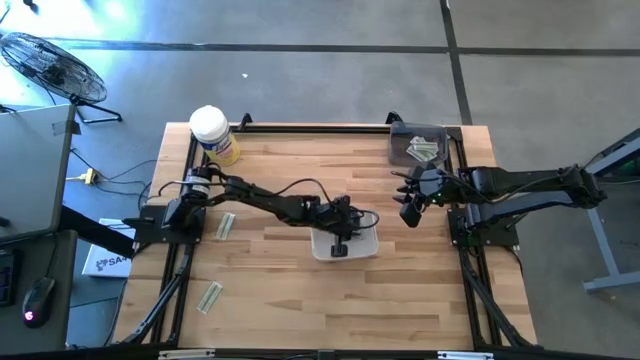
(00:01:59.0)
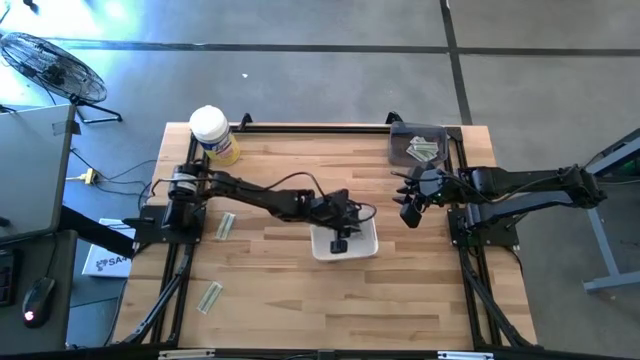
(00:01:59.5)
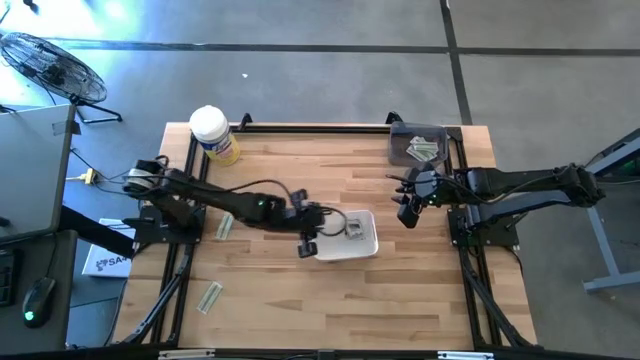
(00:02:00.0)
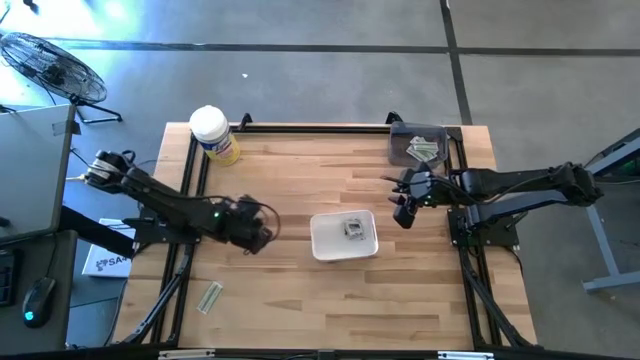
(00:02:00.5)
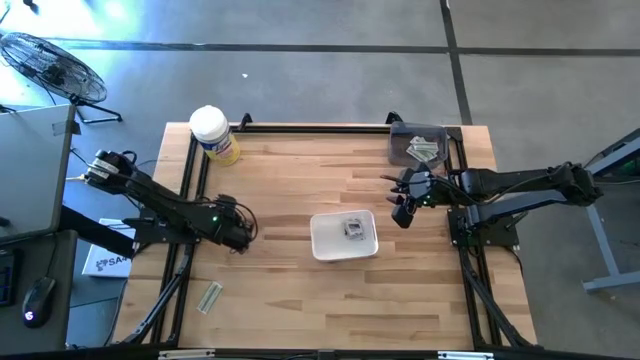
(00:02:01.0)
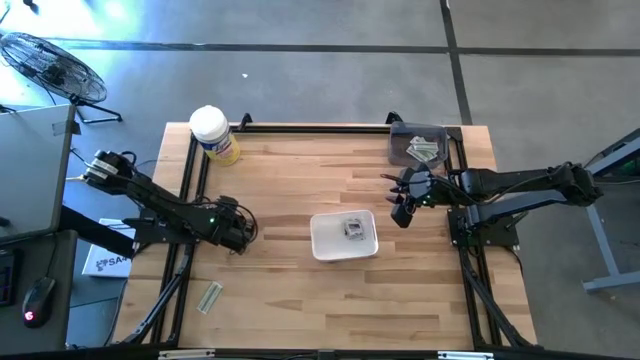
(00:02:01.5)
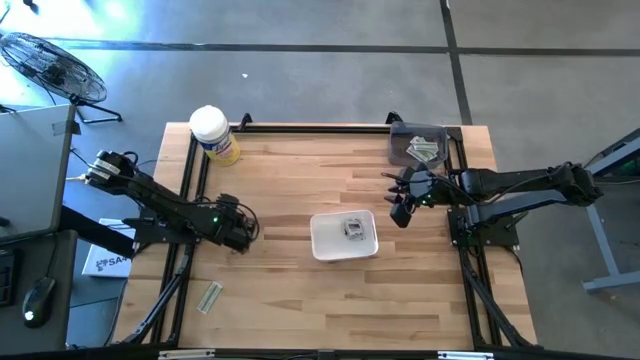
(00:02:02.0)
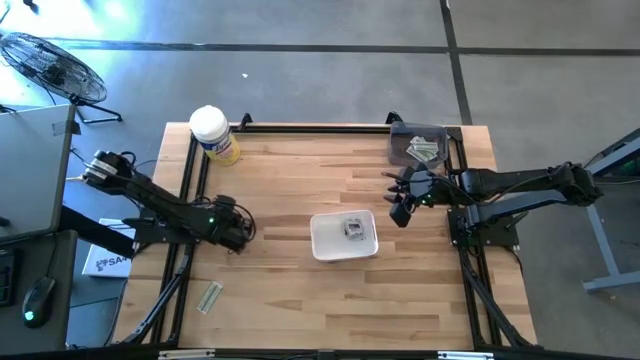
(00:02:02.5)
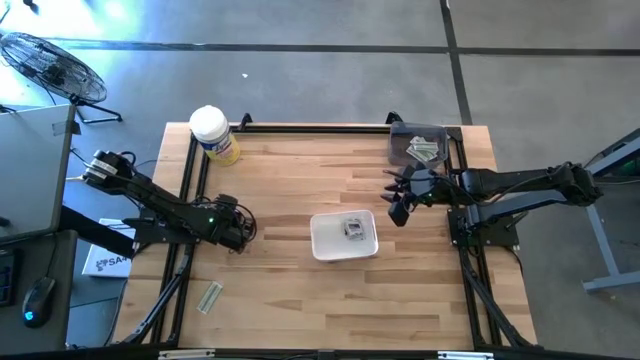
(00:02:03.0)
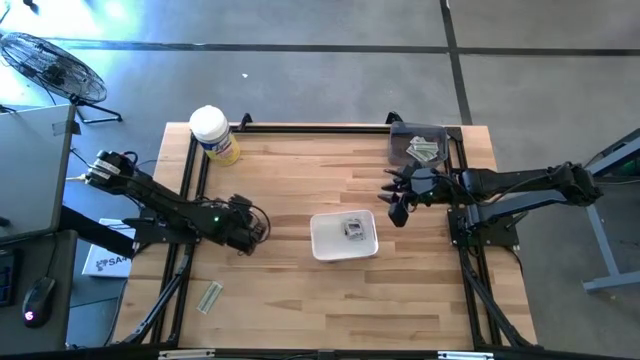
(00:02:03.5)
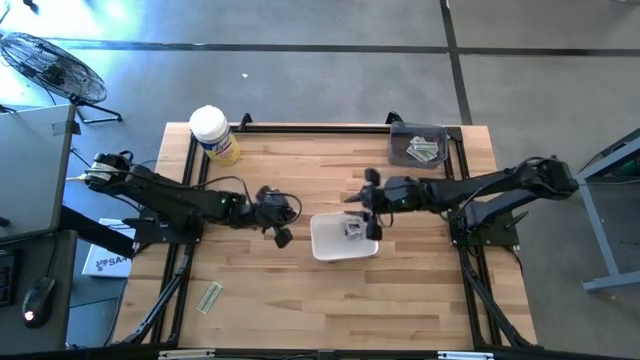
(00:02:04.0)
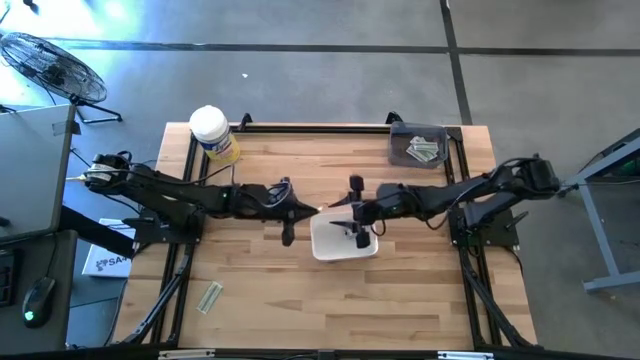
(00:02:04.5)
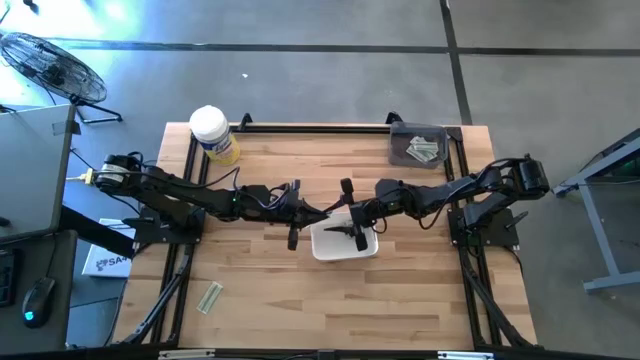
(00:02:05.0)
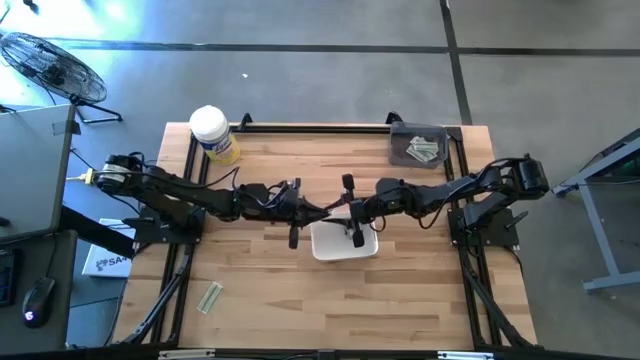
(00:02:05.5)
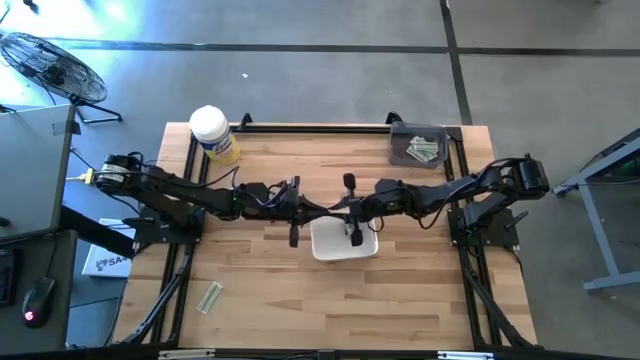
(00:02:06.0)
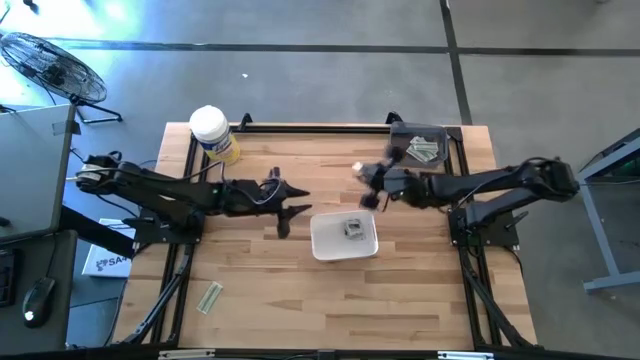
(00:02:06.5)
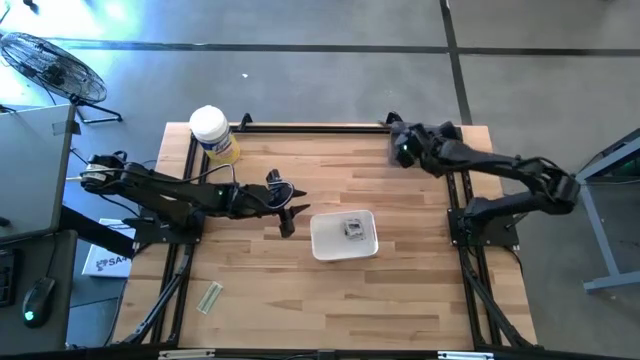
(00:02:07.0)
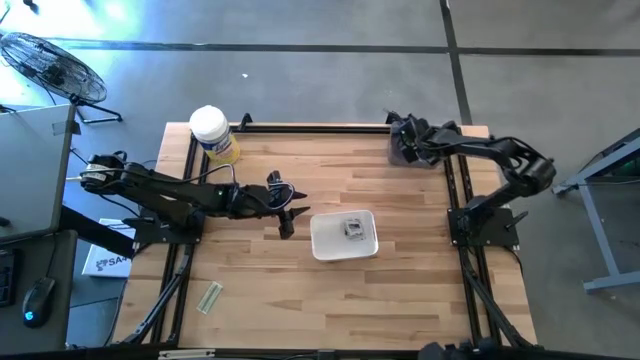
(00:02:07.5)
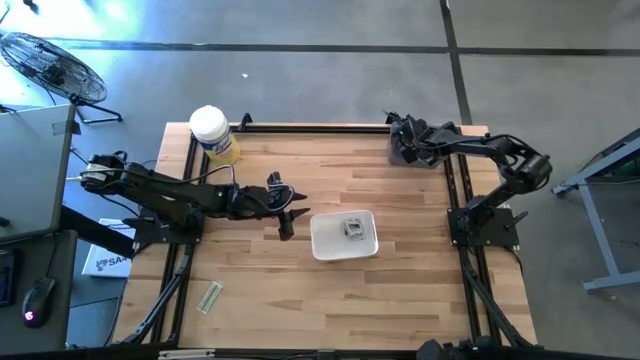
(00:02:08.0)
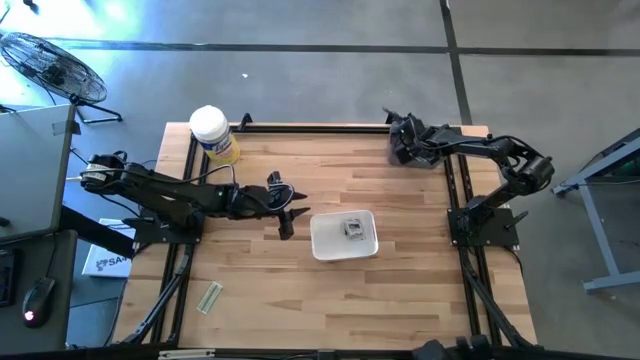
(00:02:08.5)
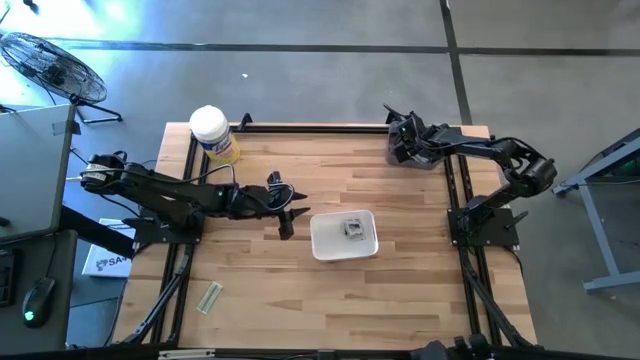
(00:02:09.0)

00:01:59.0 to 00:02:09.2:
Task: Pick & Place First Aid Supplies
Put the green bandage into the black bin

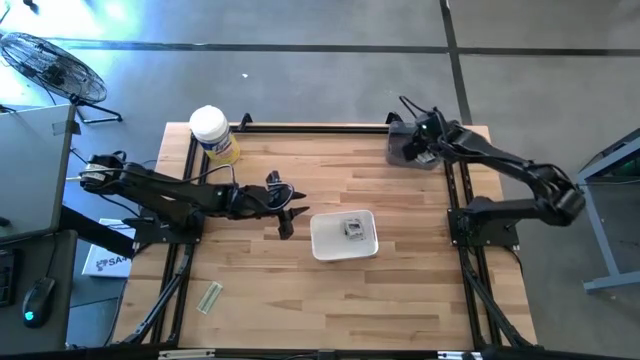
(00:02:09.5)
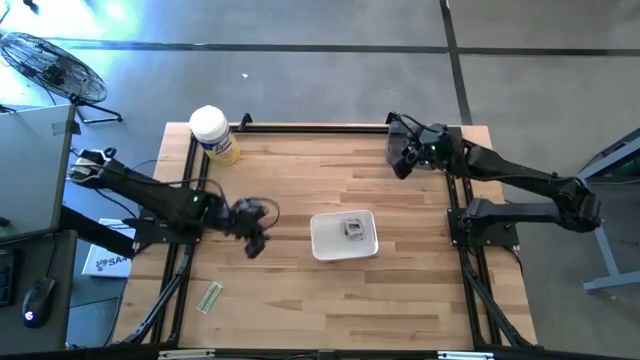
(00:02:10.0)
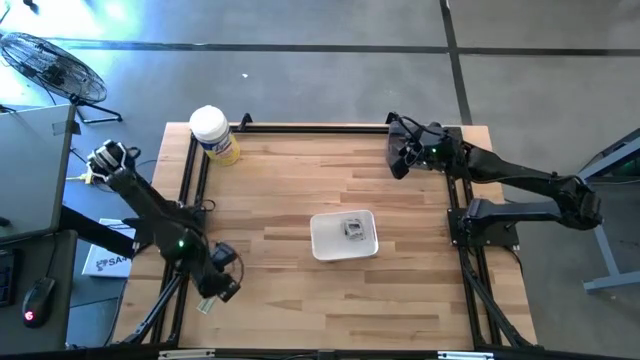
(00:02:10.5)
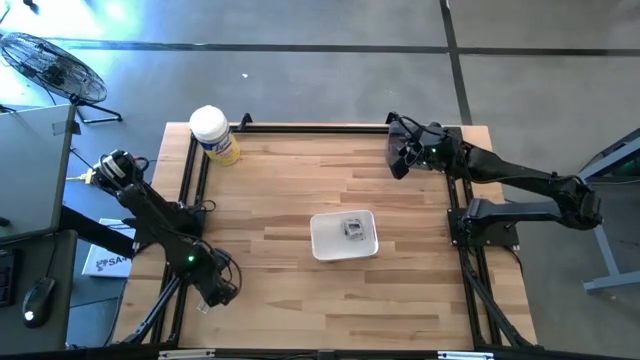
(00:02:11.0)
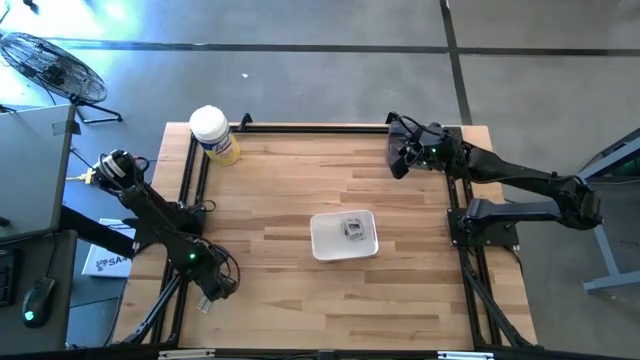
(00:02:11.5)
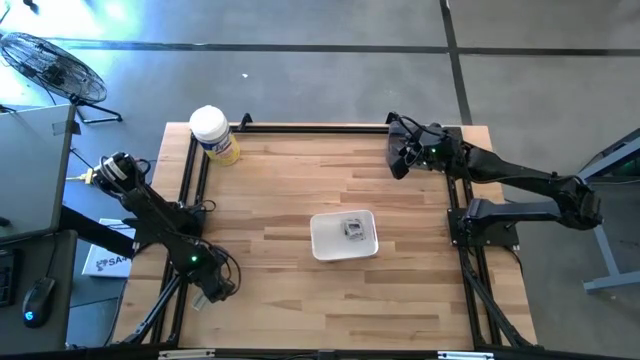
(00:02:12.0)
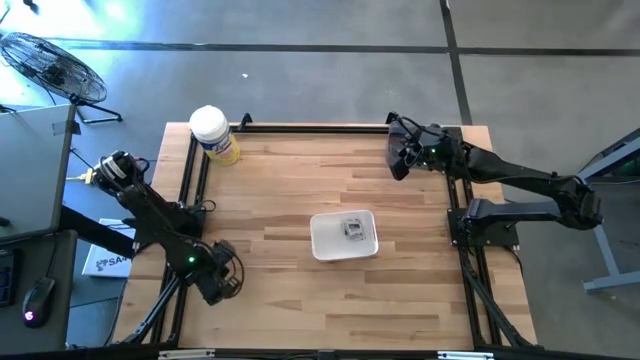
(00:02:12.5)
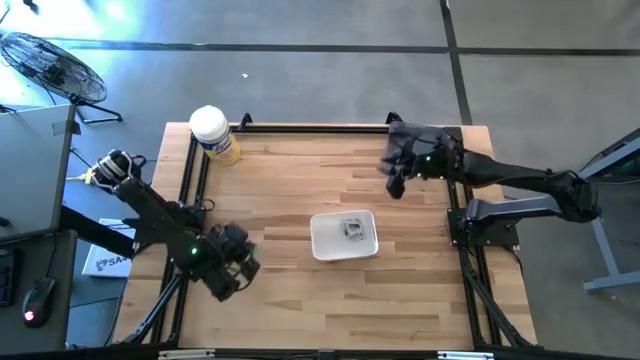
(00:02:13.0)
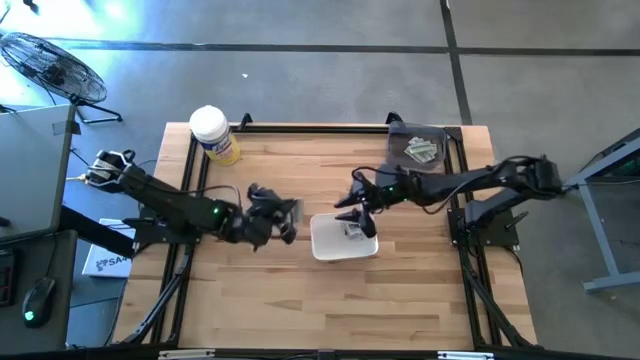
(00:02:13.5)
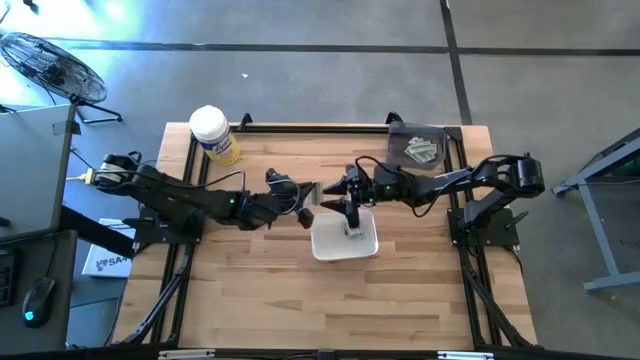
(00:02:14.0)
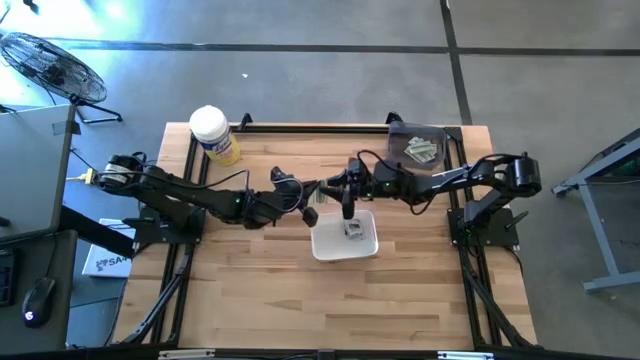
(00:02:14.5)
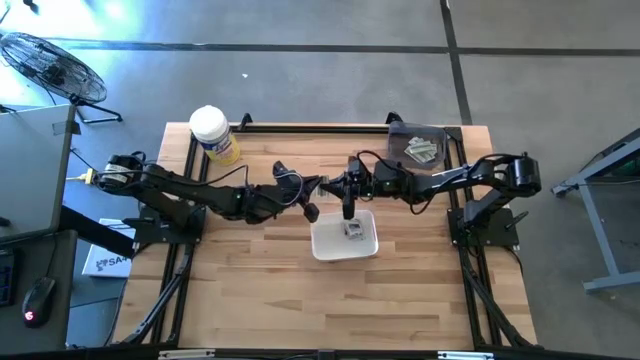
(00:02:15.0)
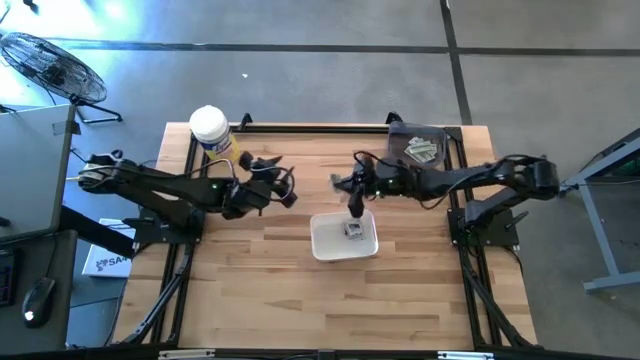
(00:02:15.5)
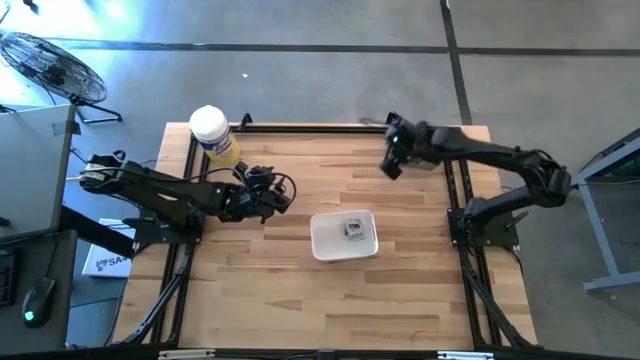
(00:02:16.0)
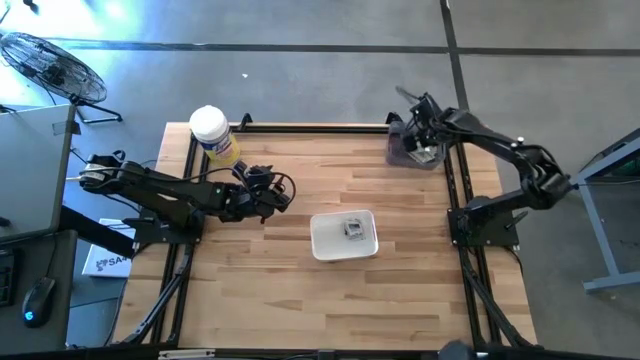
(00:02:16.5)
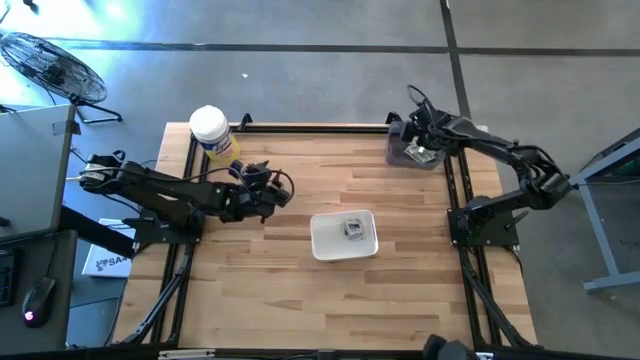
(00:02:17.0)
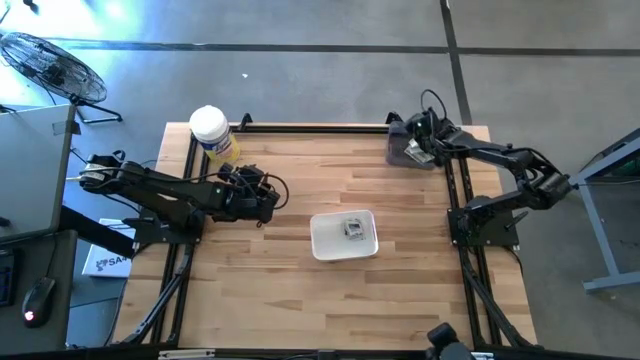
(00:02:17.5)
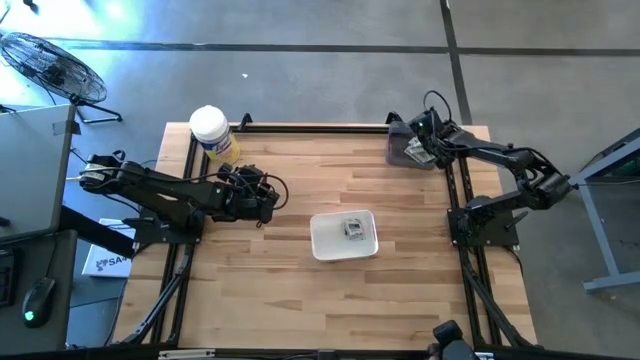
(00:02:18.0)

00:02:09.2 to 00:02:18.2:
Put the green bandage into the black bin
